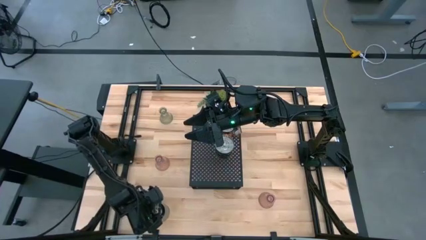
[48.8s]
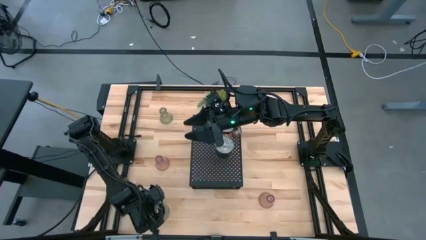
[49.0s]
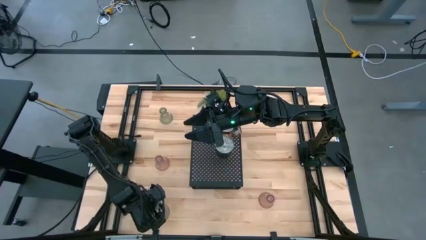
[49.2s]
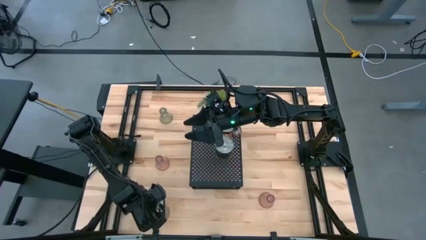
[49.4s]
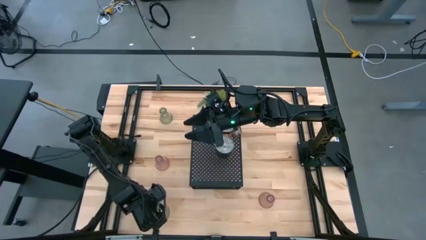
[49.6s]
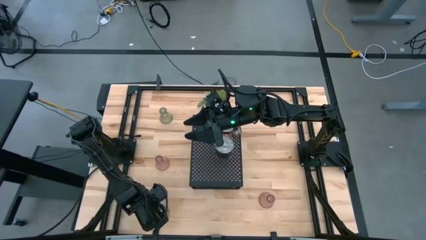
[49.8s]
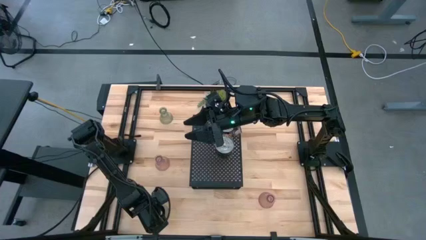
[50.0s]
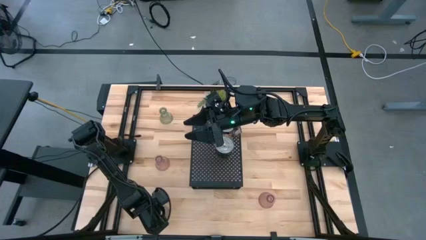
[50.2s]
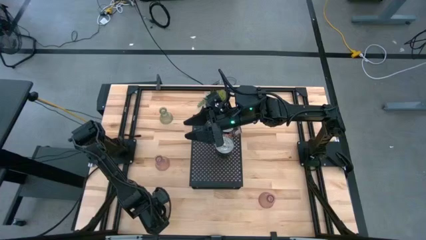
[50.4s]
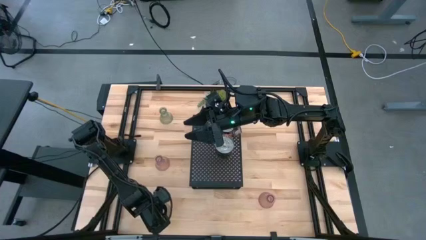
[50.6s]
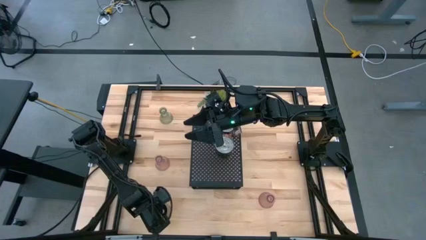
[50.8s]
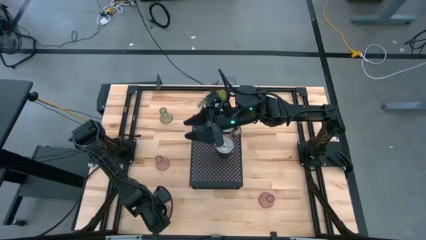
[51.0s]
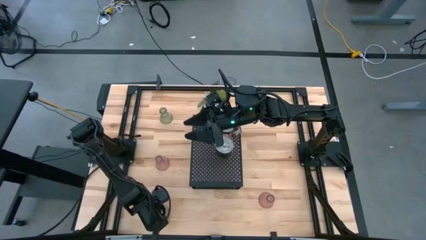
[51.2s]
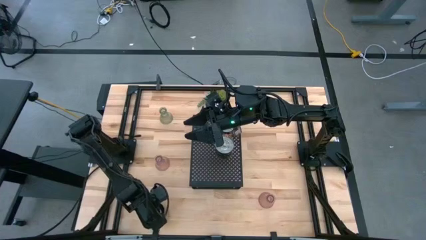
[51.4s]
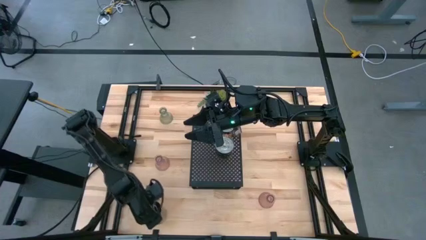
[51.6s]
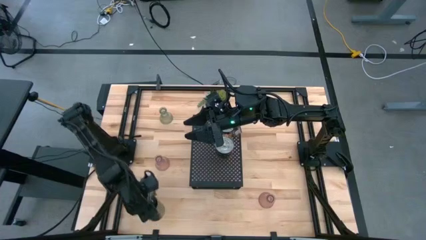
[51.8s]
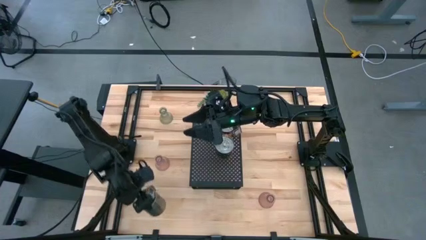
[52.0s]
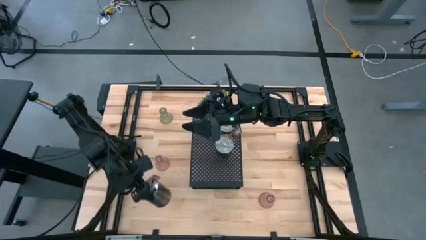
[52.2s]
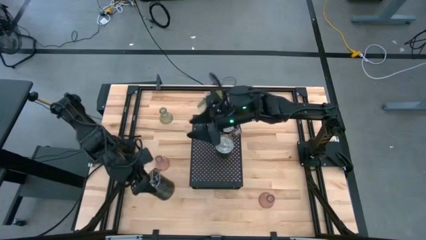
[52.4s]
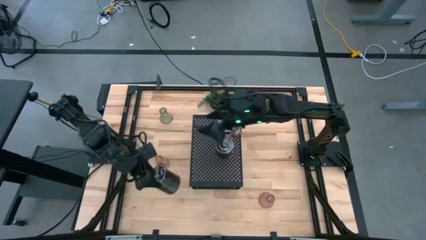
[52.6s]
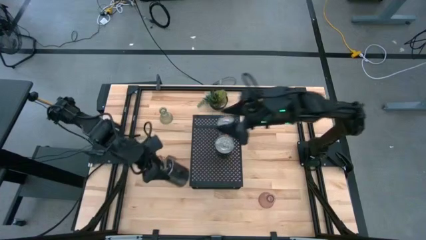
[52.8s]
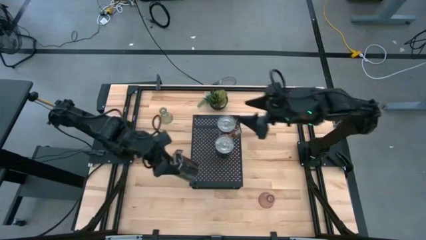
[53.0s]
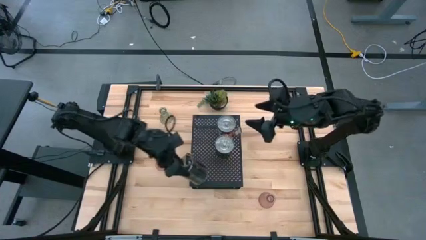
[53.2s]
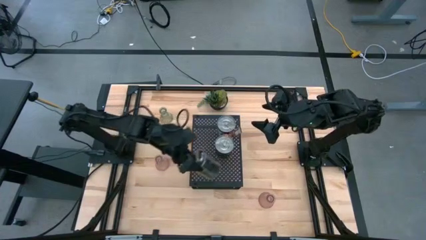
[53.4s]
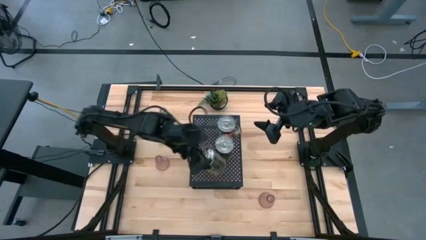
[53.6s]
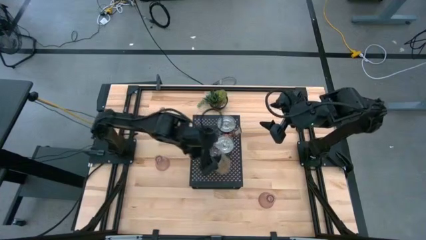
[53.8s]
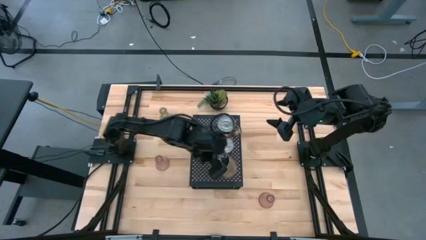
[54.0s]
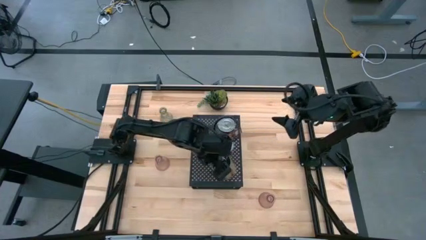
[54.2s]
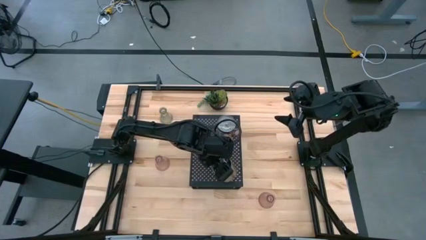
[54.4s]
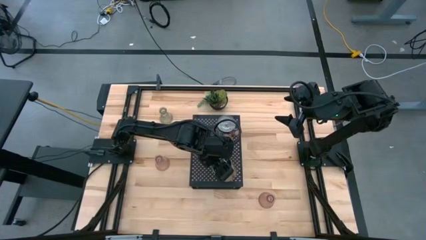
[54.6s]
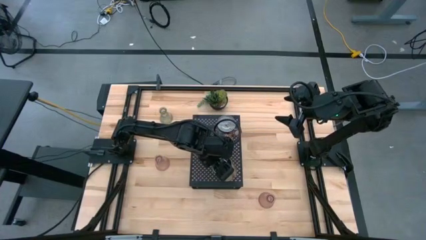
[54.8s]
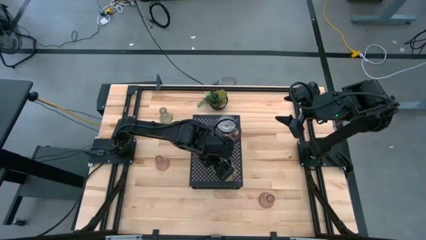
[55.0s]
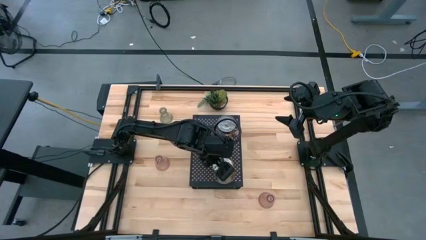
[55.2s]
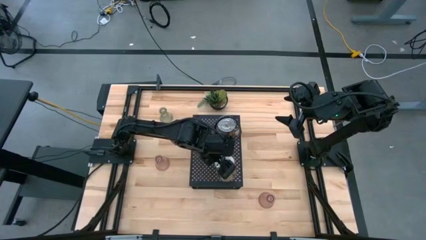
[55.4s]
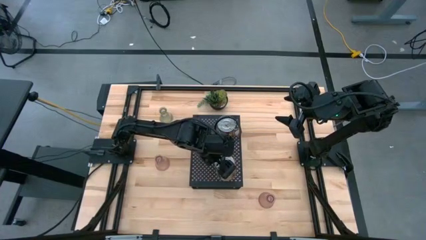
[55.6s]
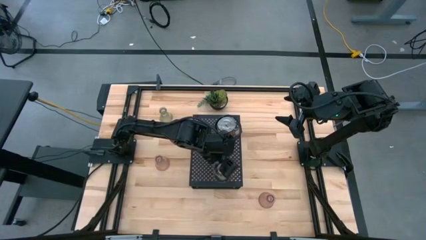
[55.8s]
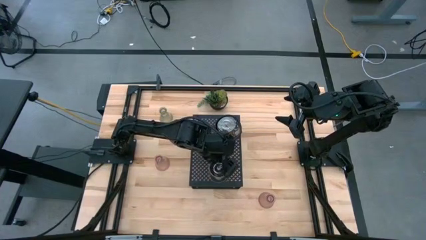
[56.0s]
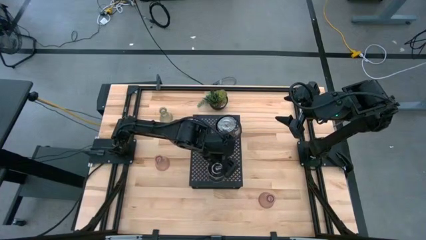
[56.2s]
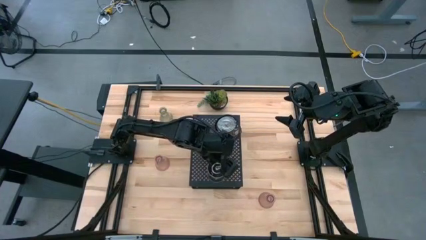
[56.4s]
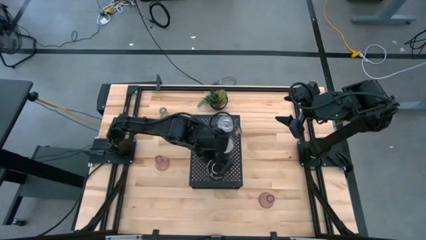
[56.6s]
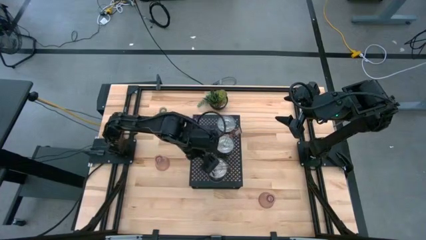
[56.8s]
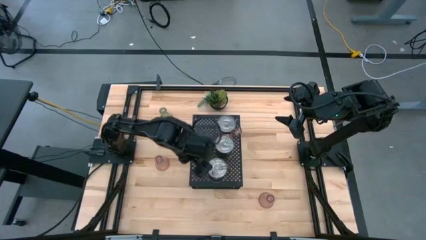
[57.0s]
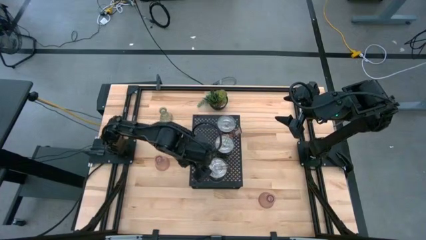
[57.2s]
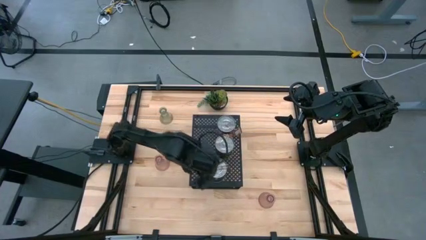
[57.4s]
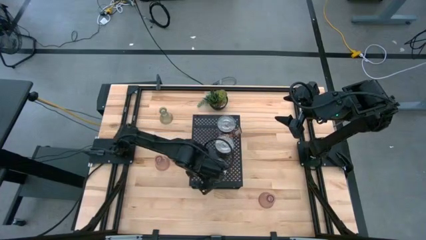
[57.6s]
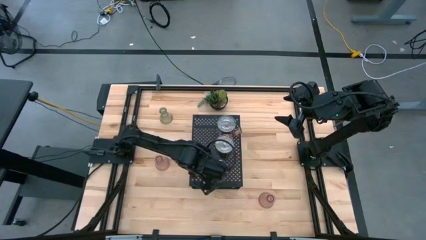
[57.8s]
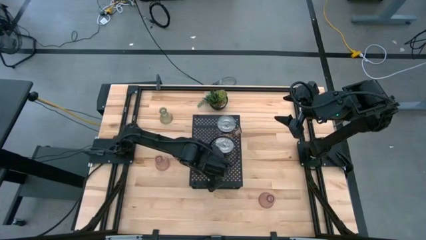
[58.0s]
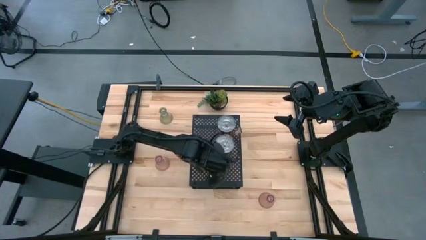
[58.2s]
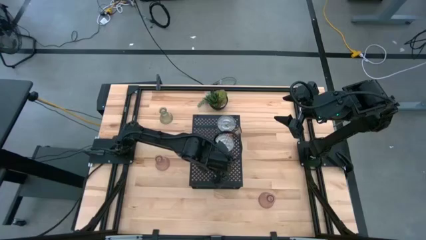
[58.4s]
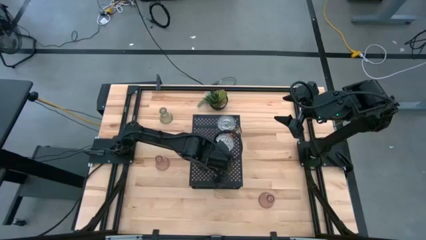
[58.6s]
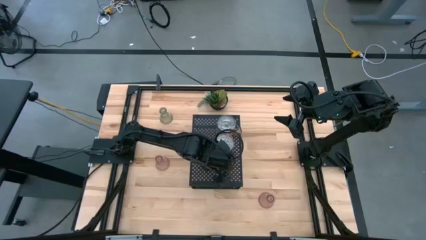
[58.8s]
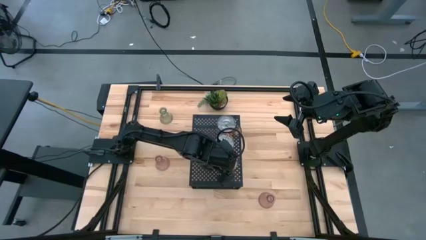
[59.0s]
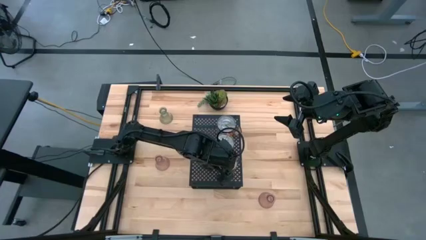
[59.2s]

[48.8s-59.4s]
Task: Pick & Place candle stick holders
Put the scented candle can on the shelf aligned with the other scented candle cans

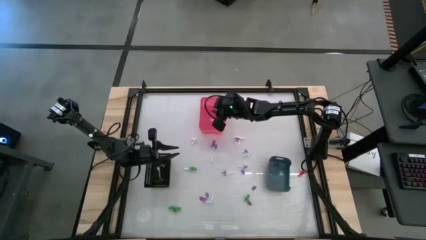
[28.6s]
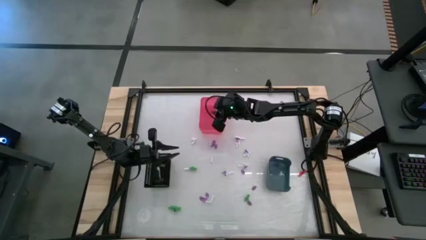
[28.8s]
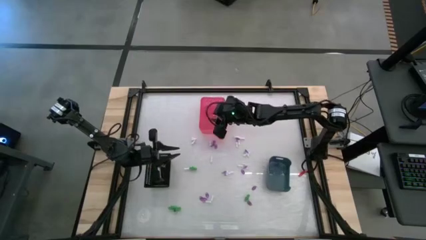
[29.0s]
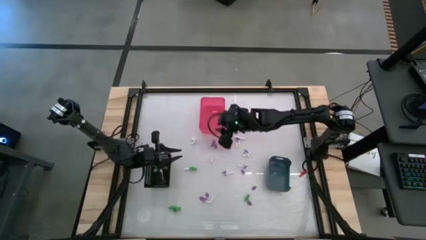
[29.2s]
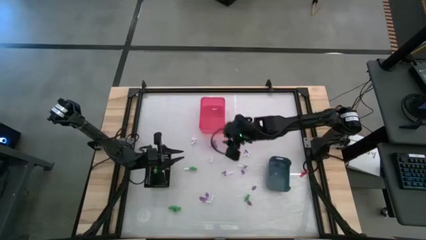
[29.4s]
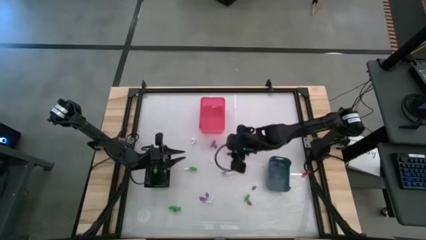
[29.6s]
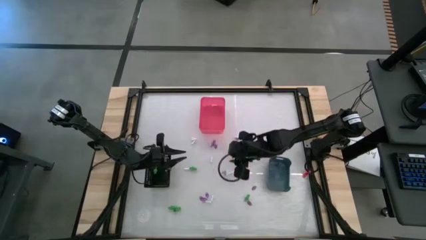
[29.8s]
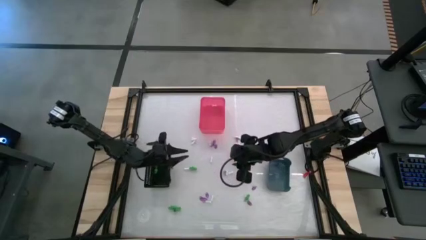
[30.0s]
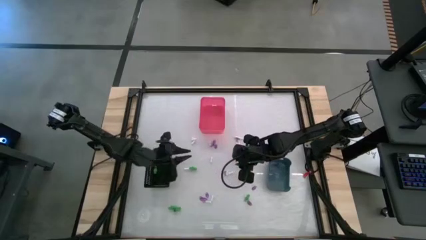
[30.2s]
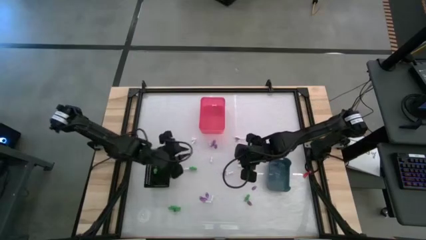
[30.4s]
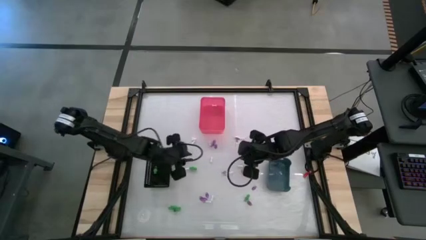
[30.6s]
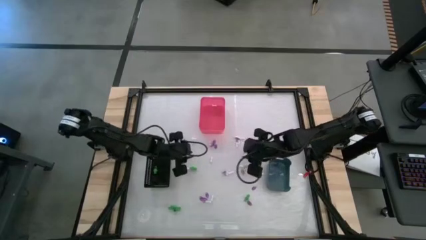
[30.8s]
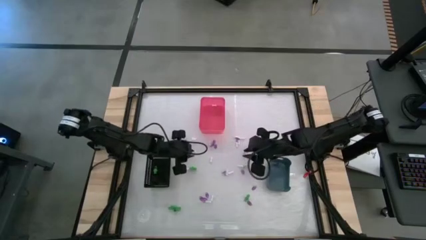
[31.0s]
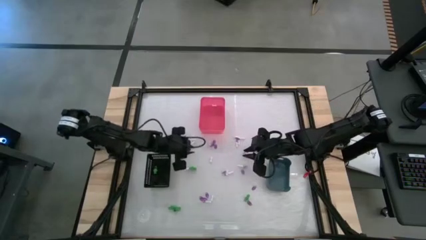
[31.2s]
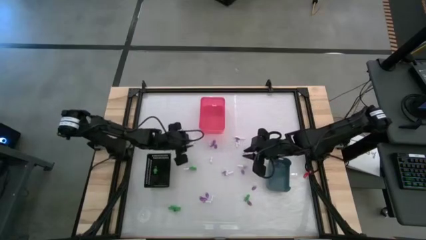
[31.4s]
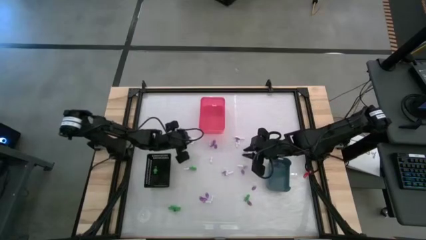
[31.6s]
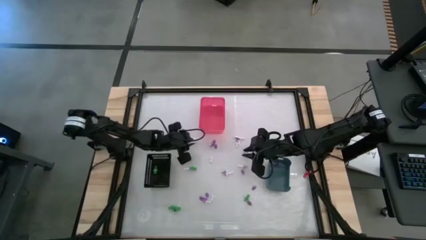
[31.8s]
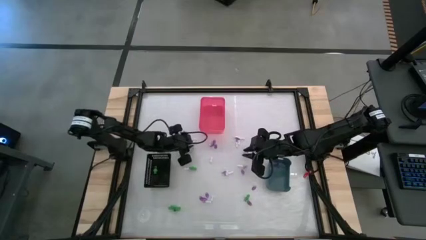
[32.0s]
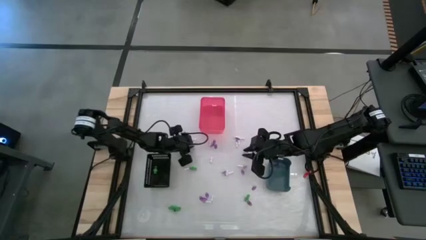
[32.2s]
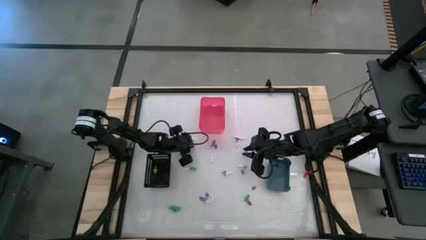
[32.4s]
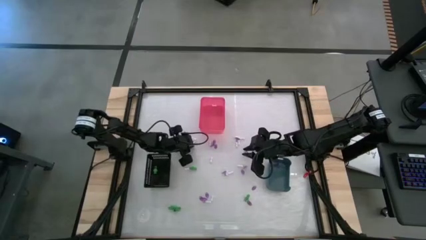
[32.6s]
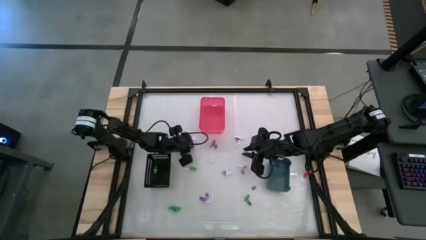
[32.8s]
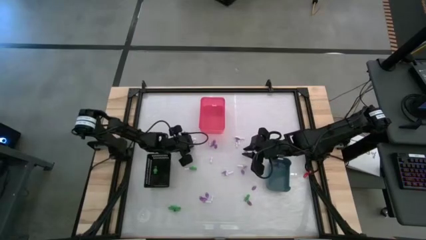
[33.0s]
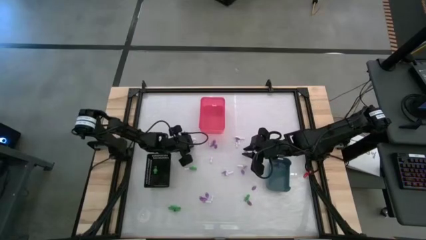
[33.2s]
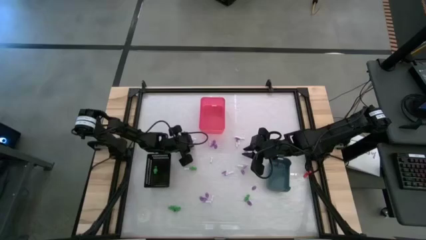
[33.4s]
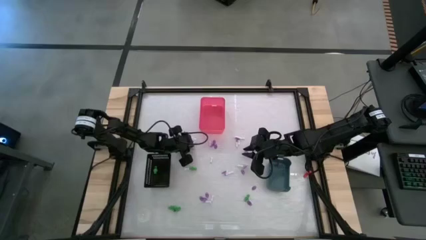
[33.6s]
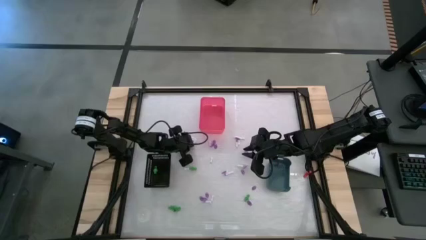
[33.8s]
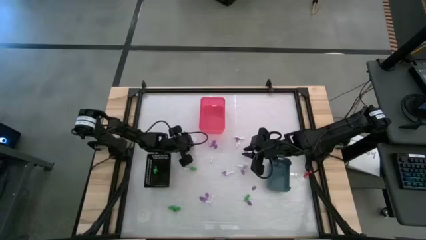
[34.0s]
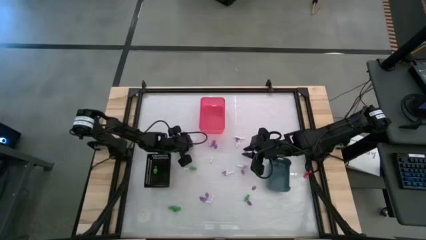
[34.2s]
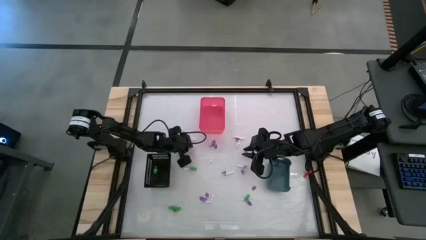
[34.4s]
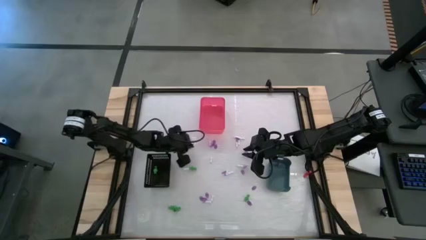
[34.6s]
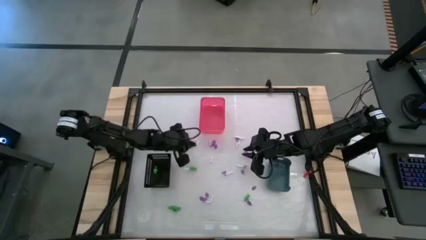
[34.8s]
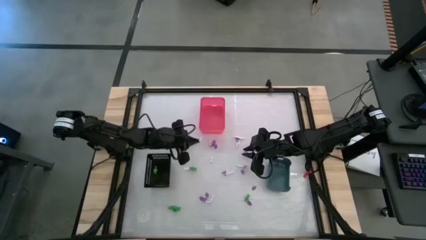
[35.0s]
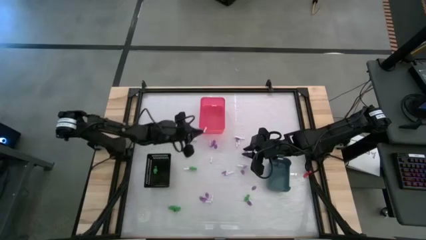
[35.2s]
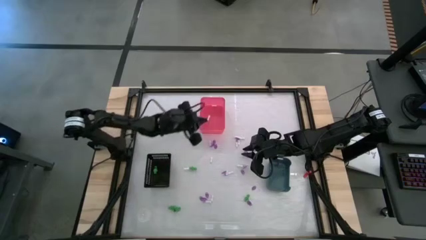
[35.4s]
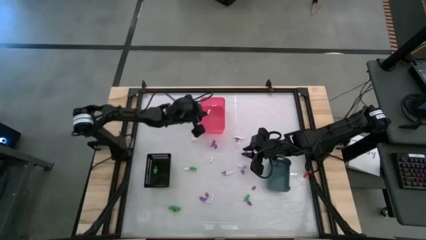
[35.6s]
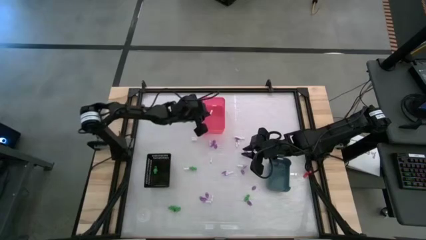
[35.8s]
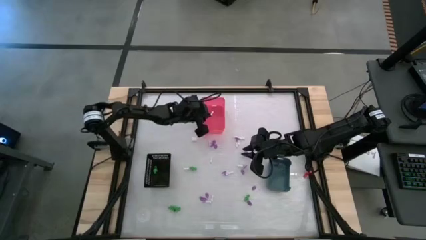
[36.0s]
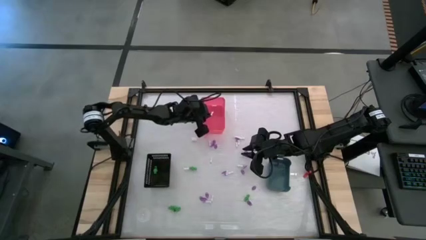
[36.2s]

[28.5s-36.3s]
Task: Sort Halloween decoration
Put the bone toy into the red bin
